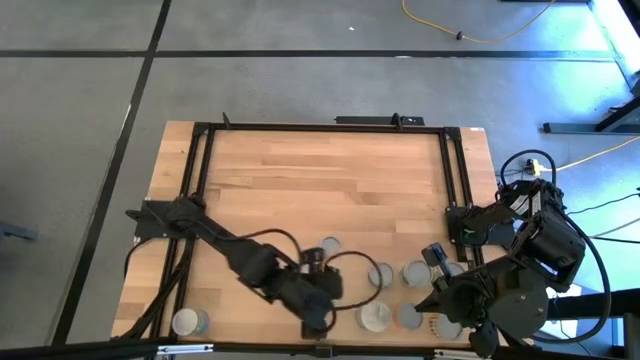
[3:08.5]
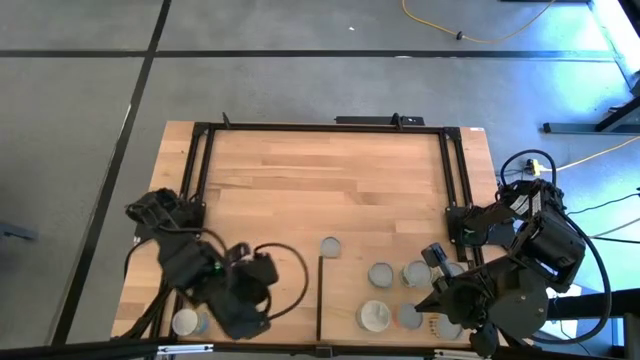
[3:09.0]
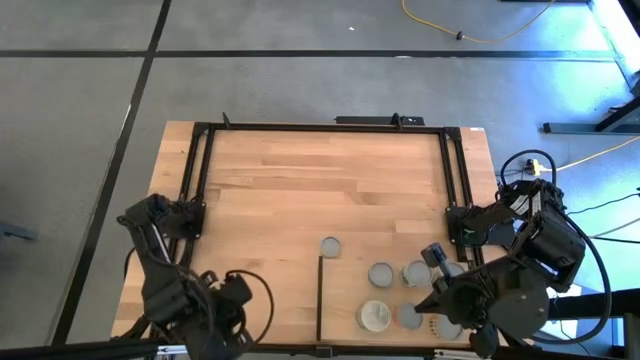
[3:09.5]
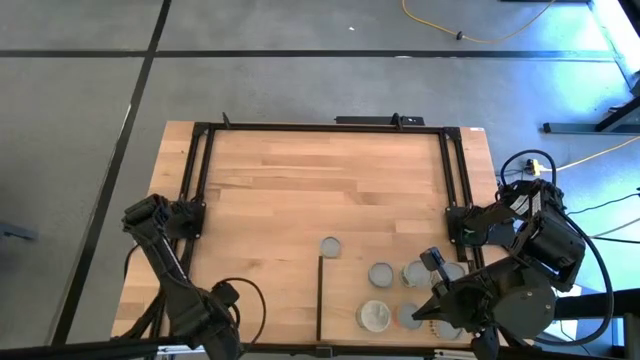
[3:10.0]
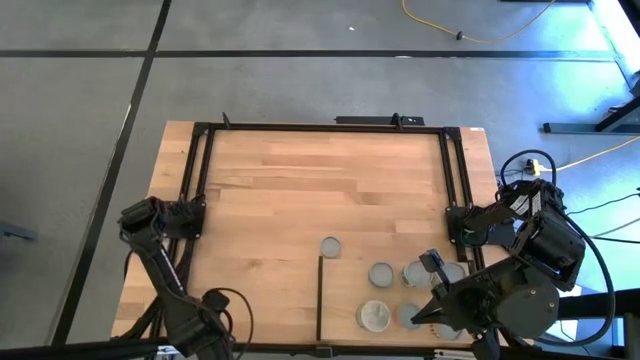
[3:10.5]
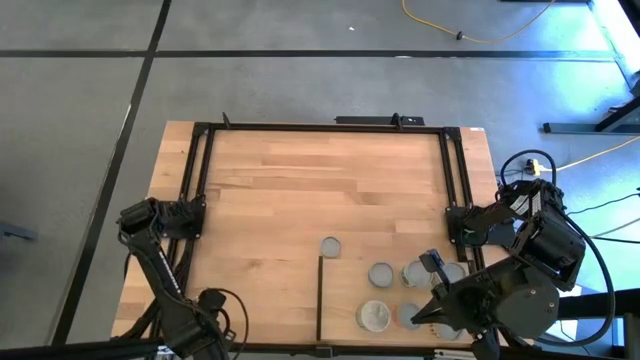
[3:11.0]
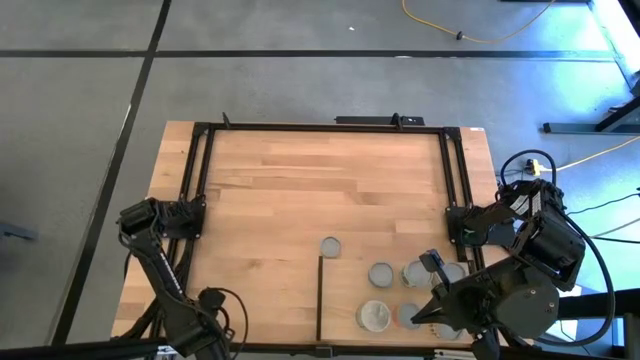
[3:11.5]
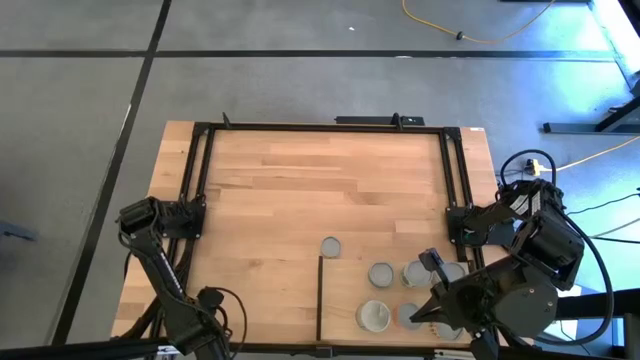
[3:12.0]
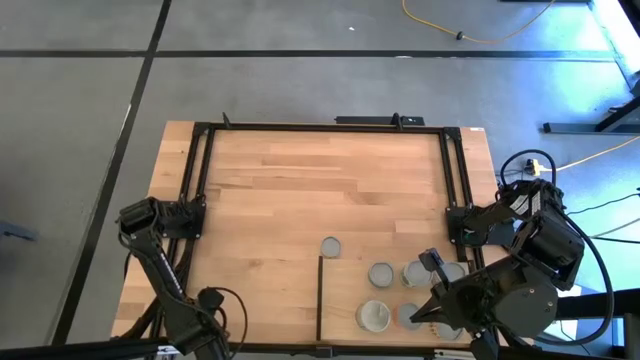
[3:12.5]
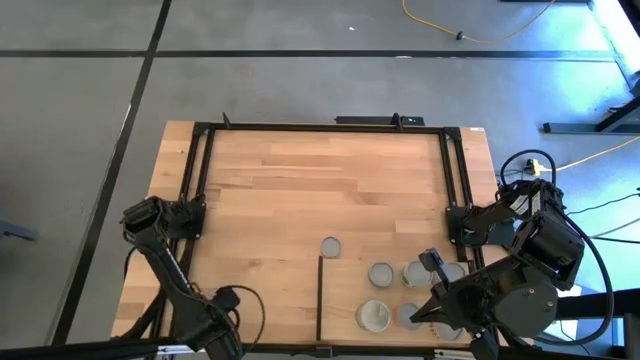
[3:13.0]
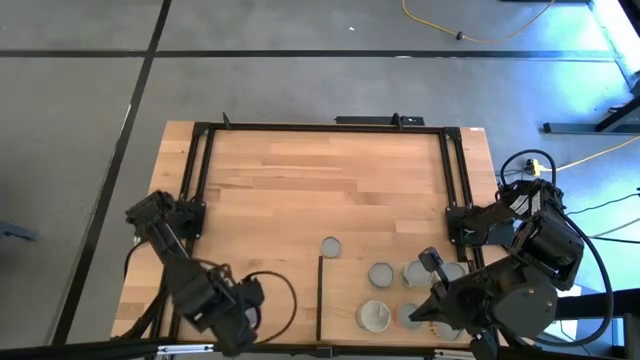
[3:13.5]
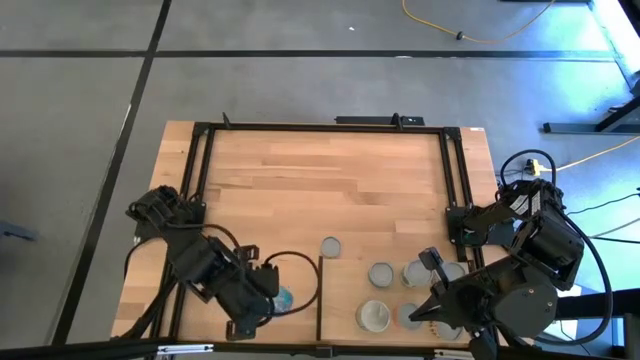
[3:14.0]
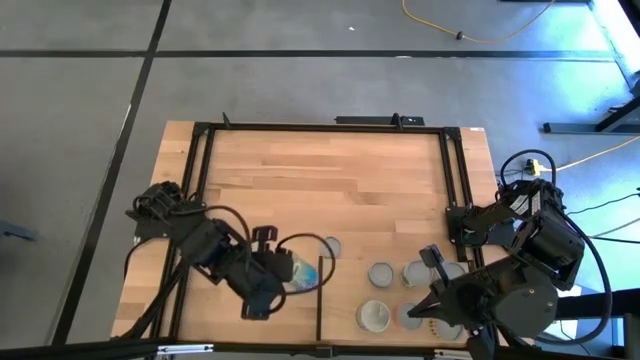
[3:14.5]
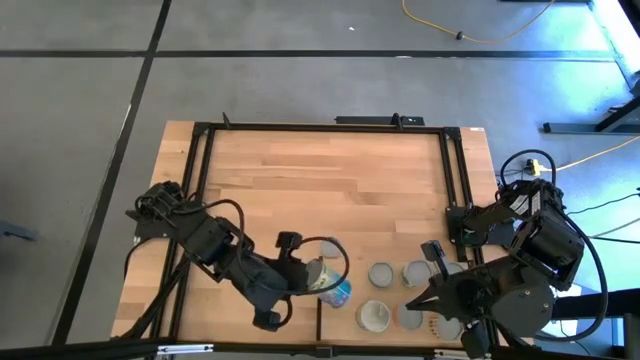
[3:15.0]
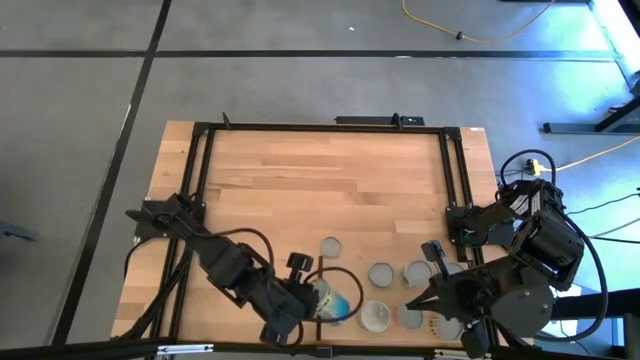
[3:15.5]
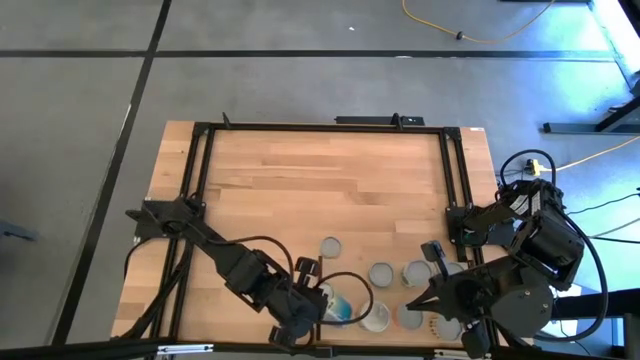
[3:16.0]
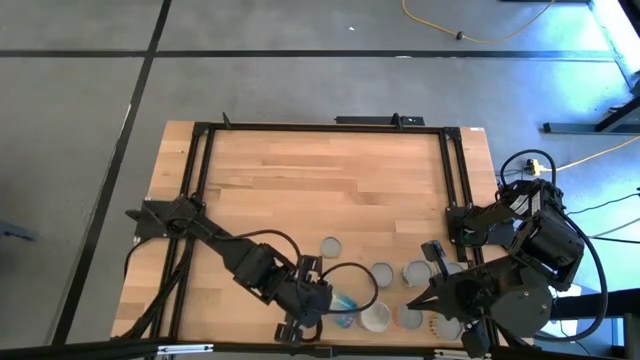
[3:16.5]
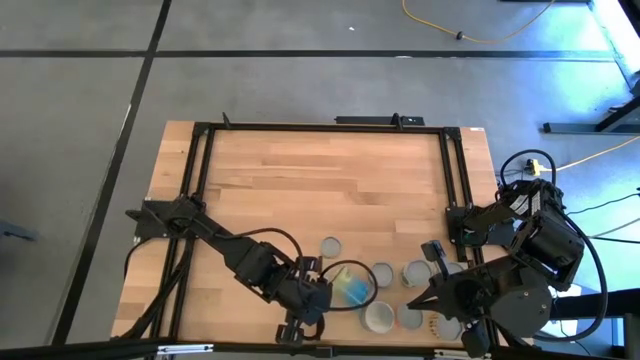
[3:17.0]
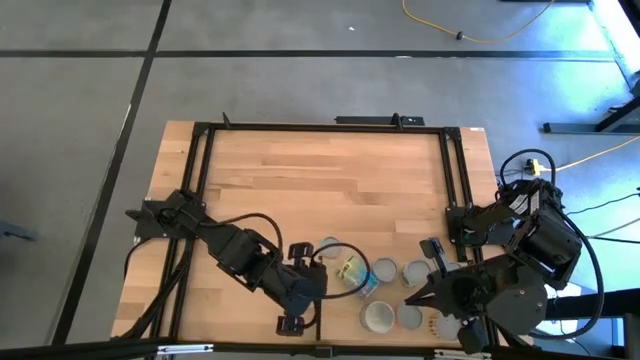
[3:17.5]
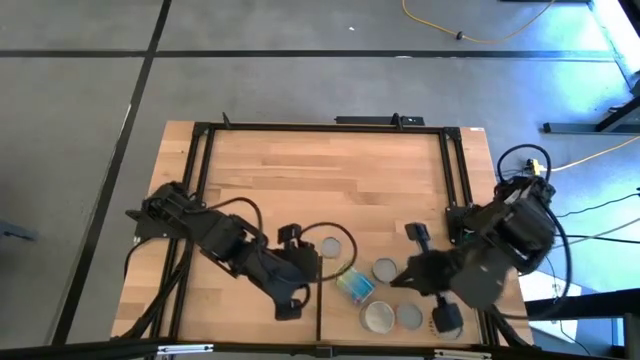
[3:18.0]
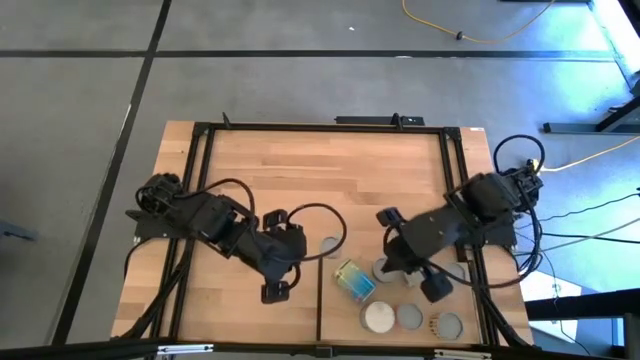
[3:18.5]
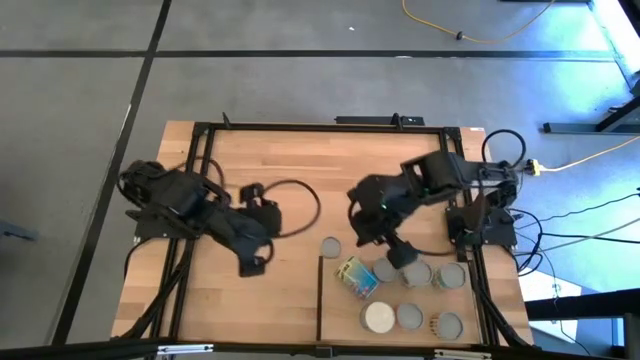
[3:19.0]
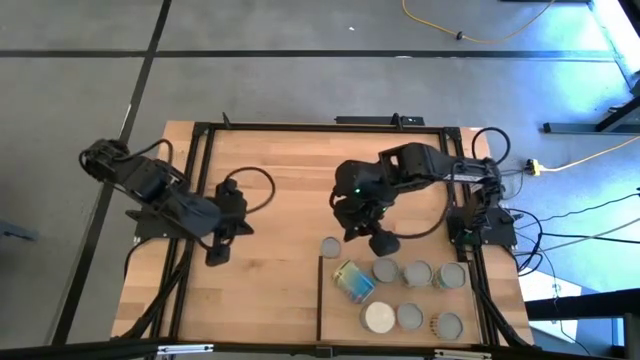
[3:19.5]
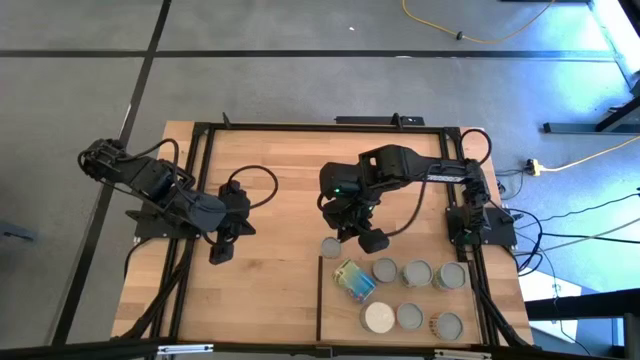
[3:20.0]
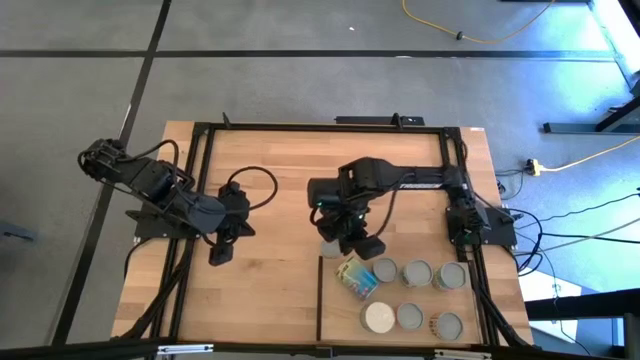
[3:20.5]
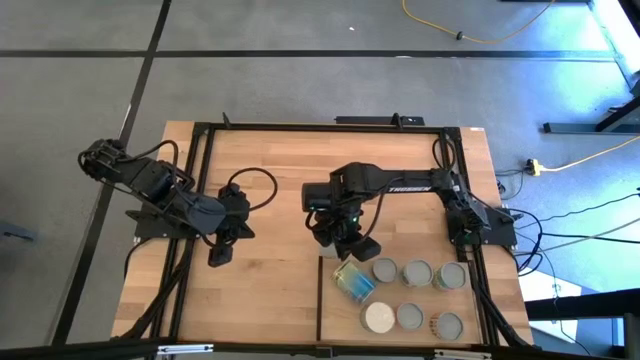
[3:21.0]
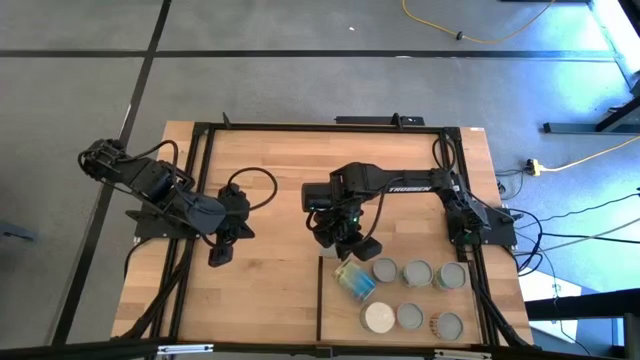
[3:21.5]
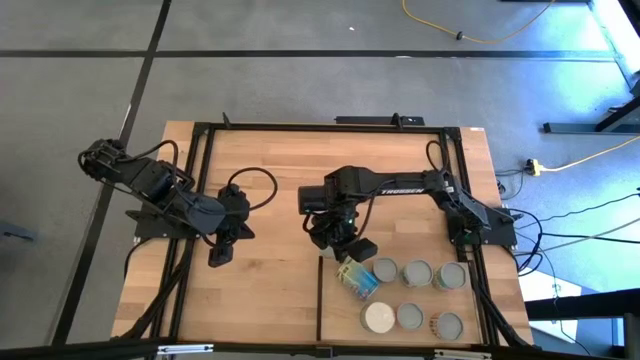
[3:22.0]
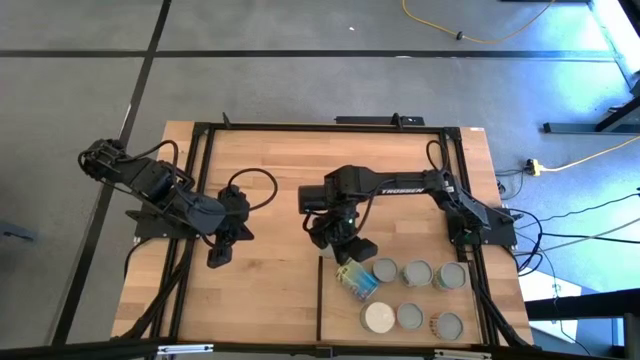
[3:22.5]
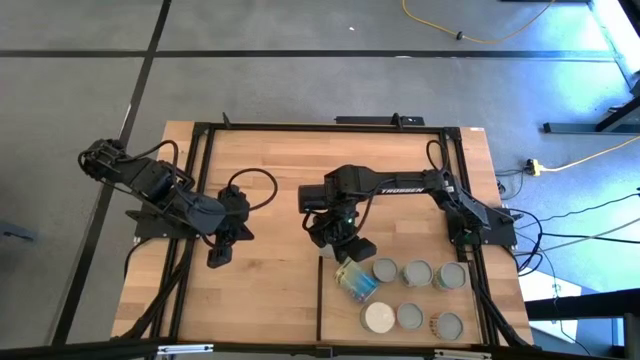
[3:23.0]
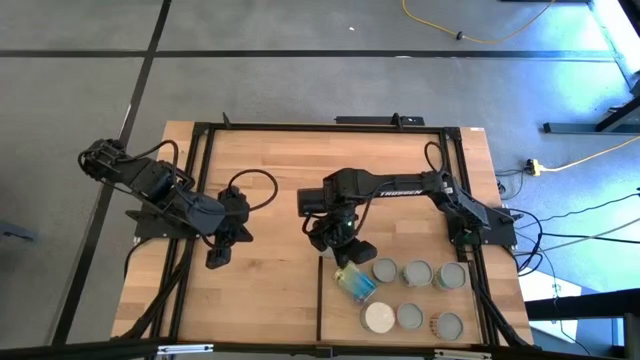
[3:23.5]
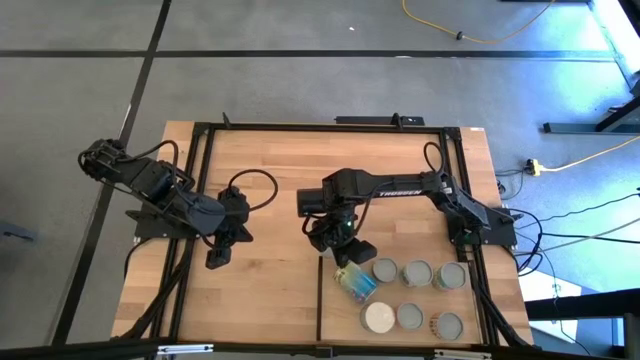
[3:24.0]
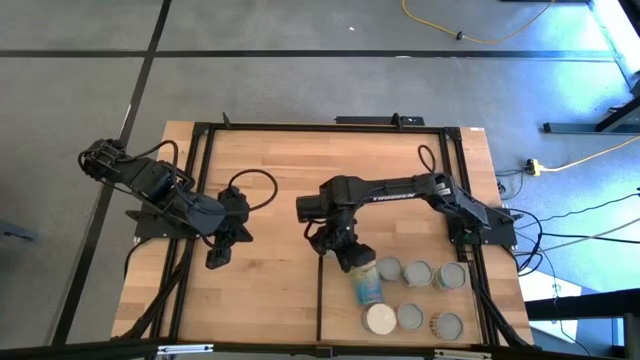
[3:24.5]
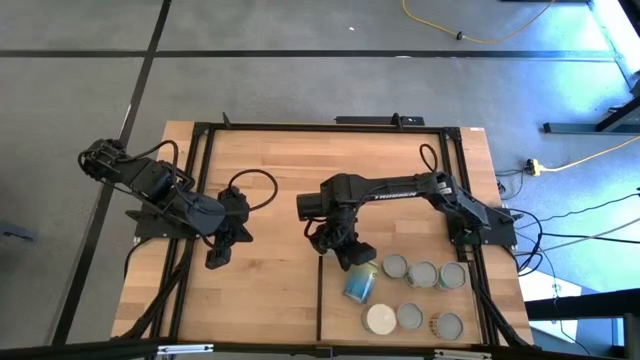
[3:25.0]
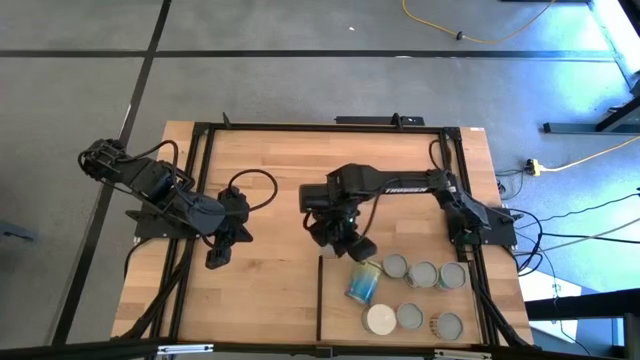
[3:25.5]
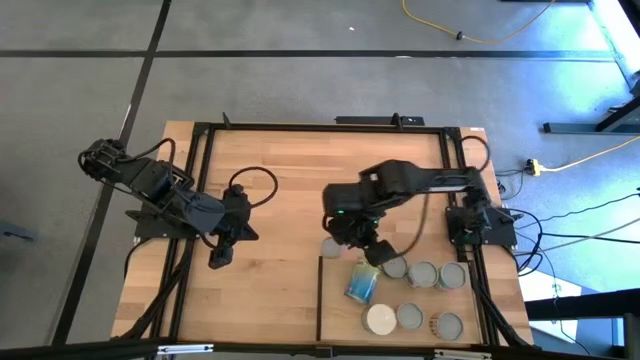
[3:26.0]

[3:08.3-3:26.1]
Task: Pick and place cans onto a shelf
Put the blue canned cherries on the shelf

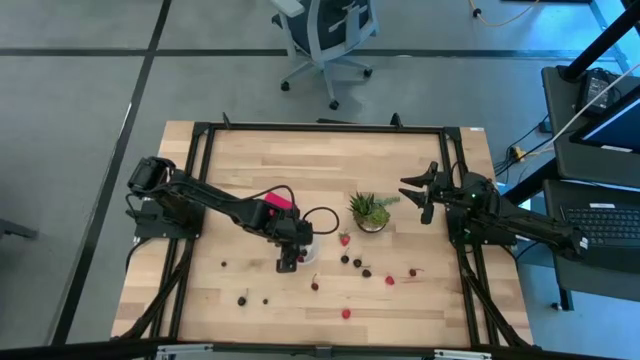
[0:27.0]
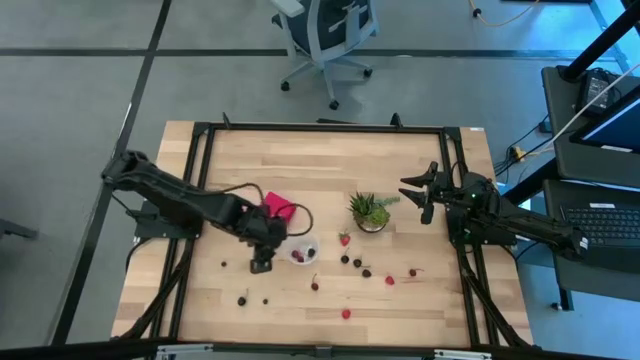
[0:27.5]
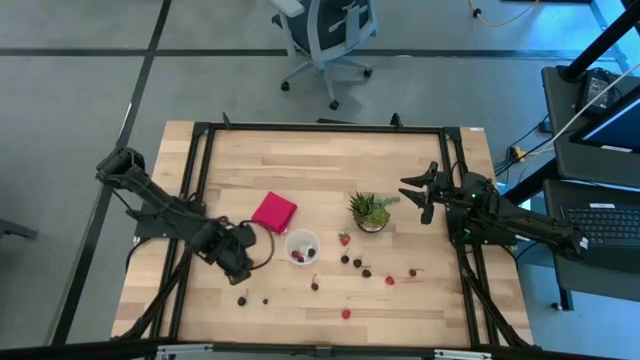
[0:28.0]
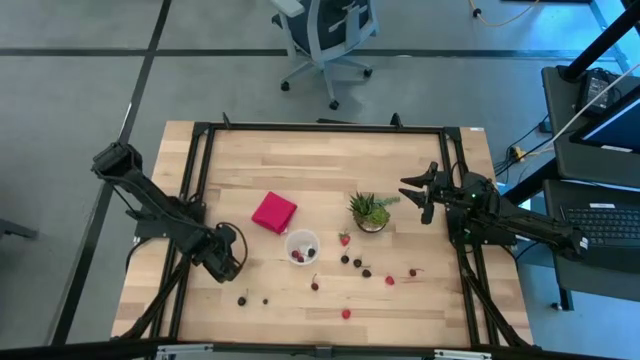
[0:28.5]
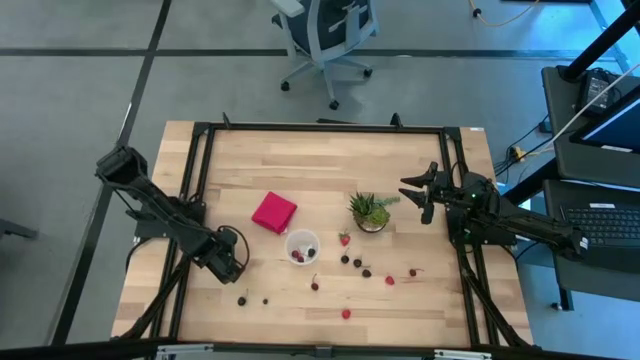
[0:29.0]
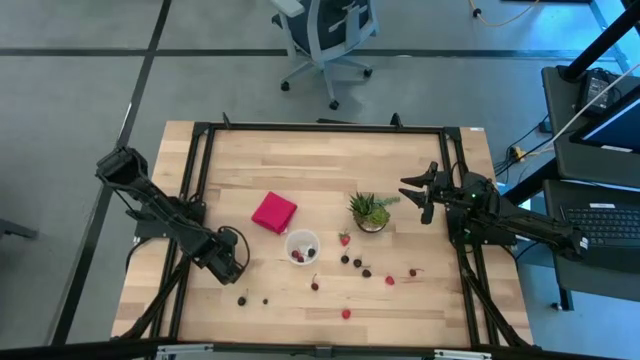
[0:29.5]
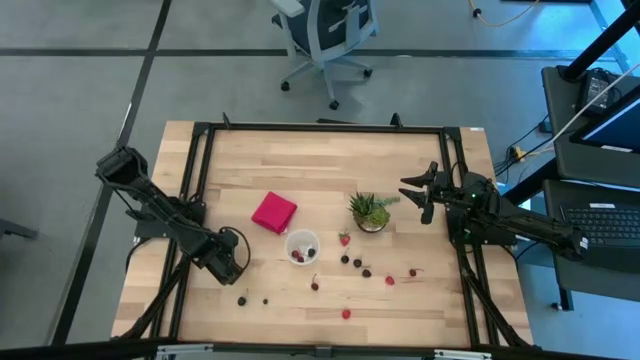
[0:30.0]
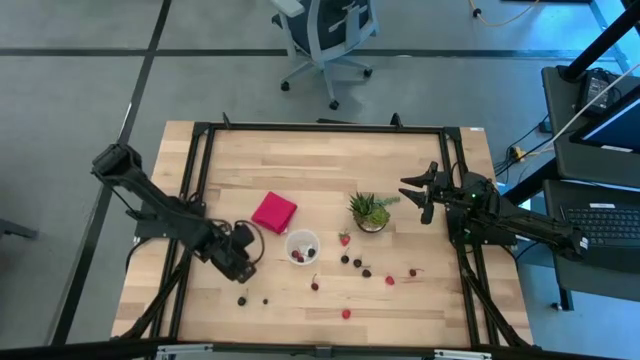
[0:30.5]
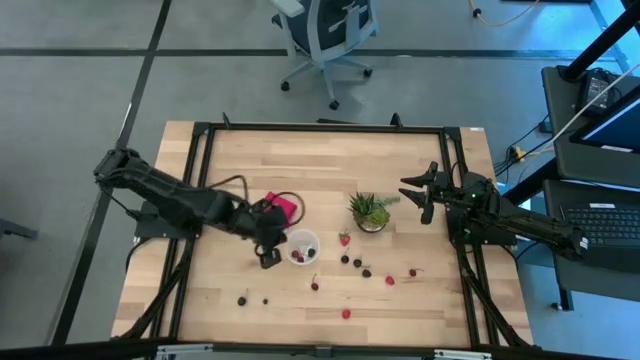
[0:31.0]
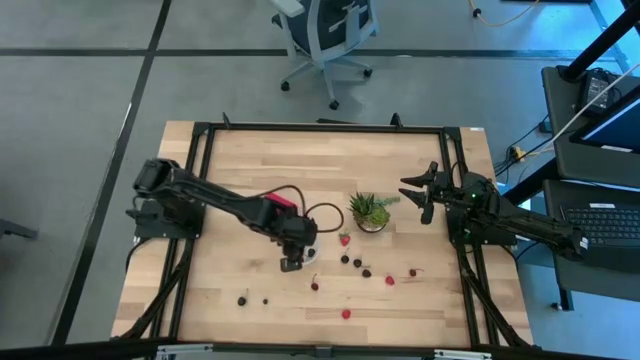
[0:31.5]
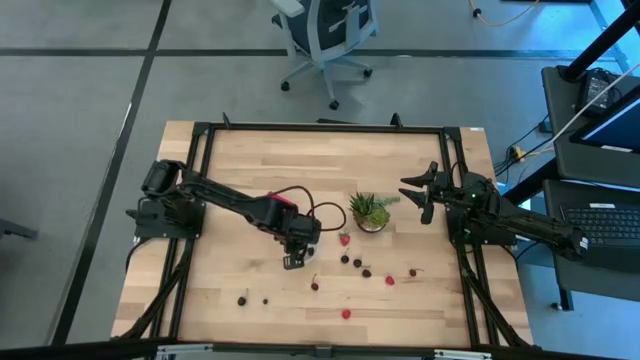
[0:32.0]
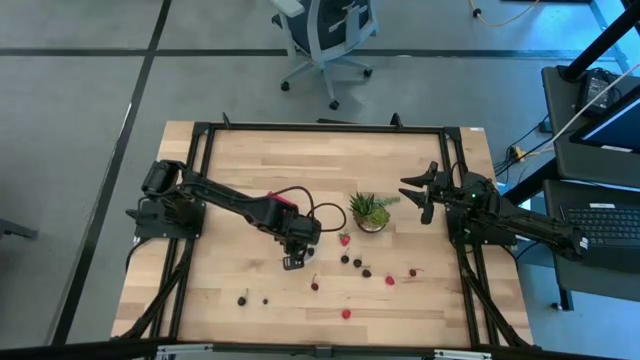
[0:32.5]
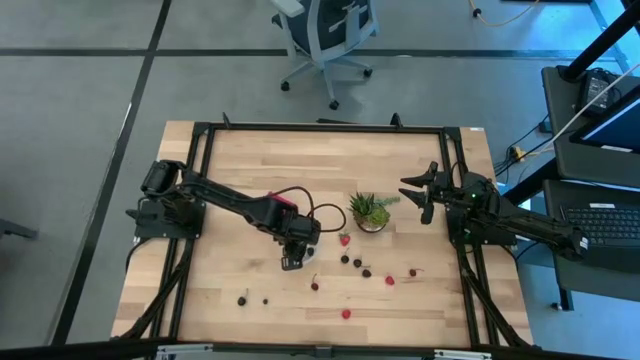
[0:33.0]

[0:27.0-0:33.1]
Task: Pick and placing Produce into tupperware
Put the blueberry into the container
